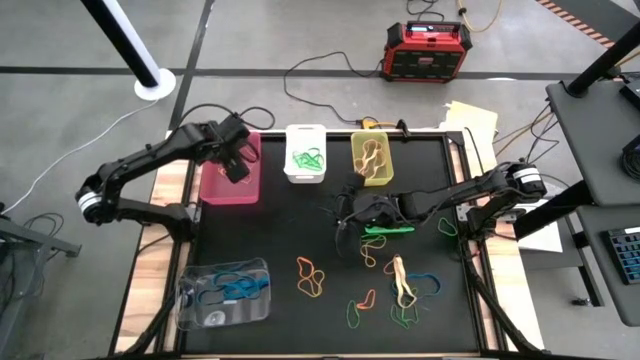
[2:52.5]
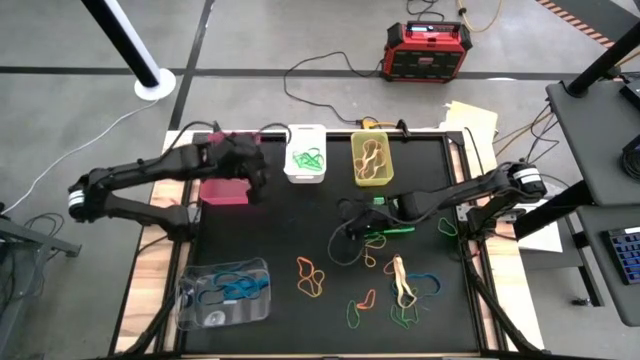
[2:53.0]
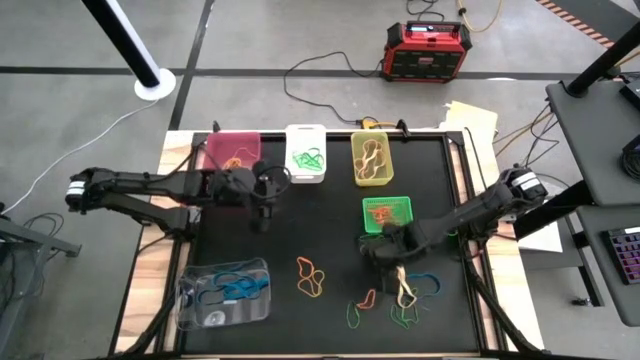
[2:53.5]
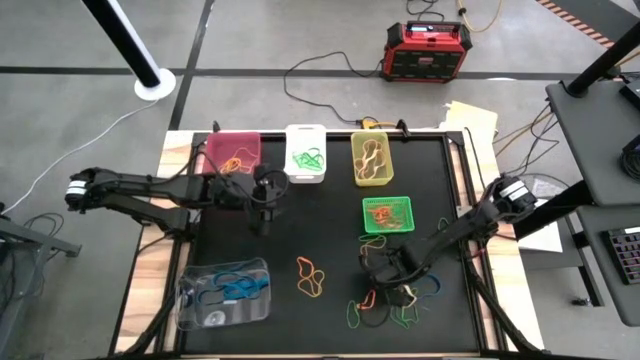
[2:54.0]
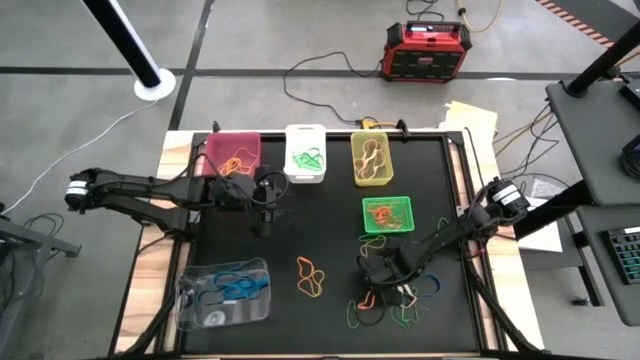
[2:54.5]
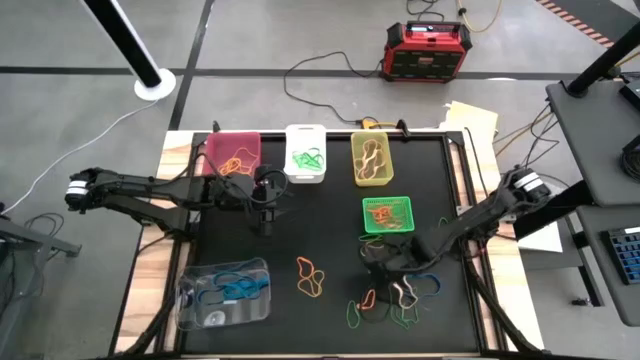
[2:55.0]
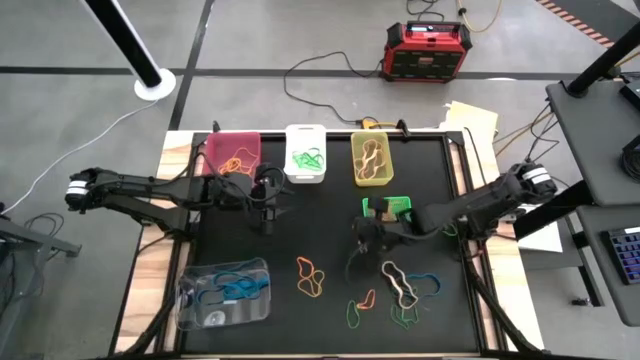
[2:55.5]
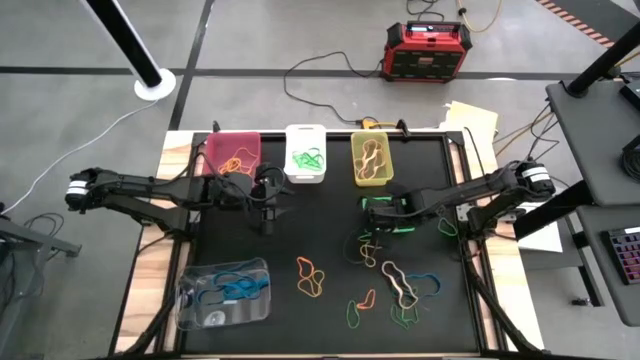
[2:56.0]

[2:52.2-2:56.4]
Task: Sort rubber bands into baskets
Put the orange rubber band into the green bin

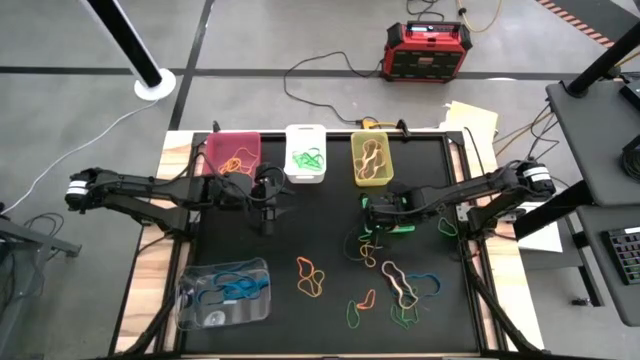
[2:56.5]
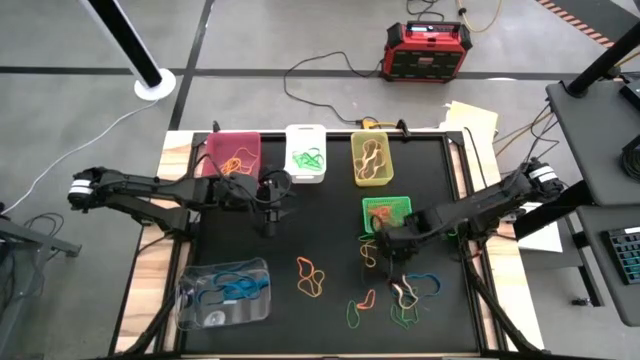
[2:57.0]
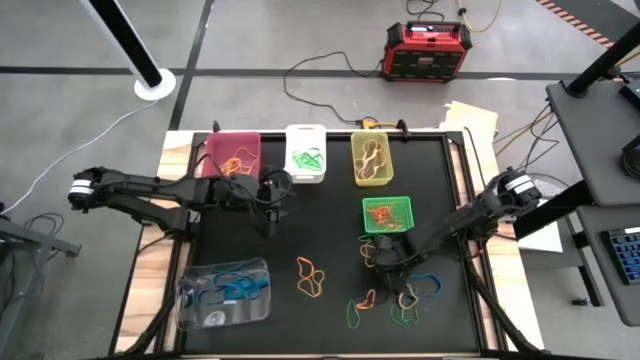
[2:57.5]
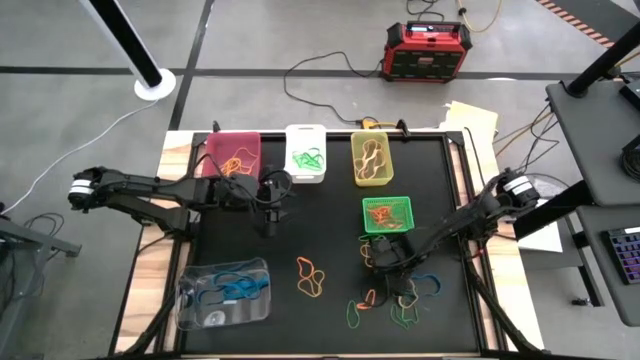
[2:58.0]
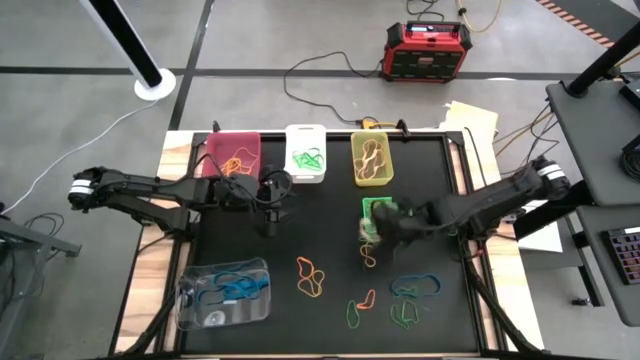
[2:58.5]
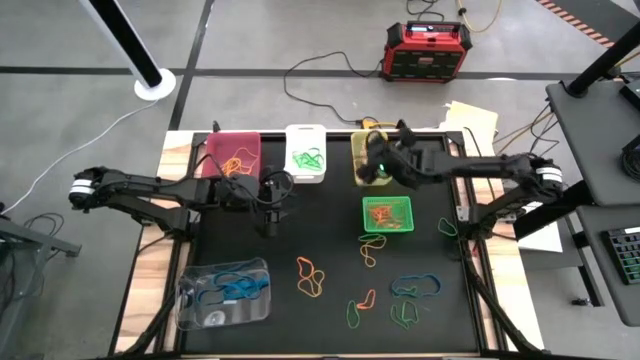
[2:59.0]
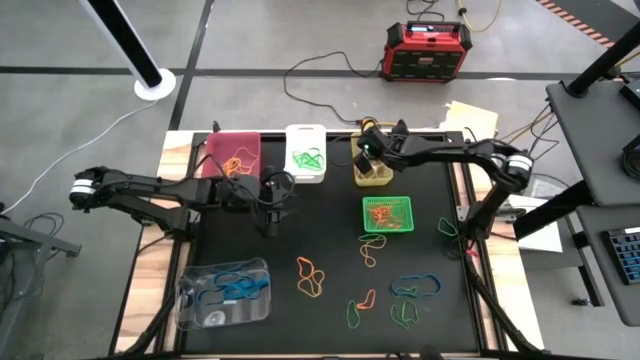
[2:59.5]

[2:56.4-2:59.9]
Put the brown rubber band into the yellow bin

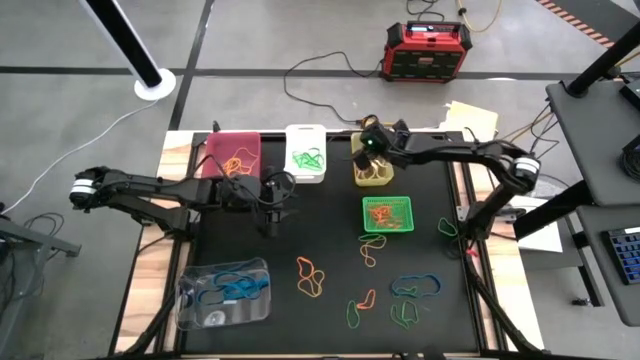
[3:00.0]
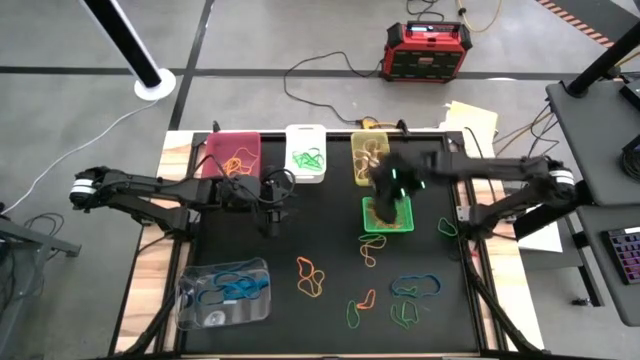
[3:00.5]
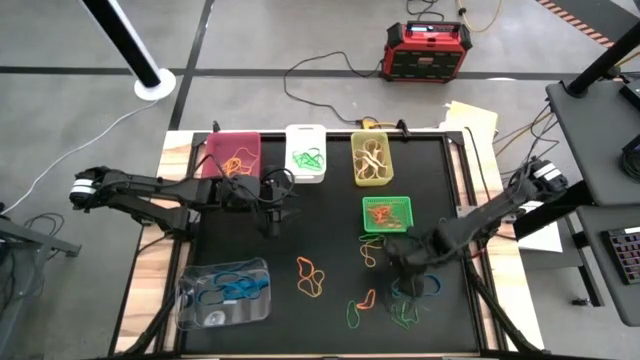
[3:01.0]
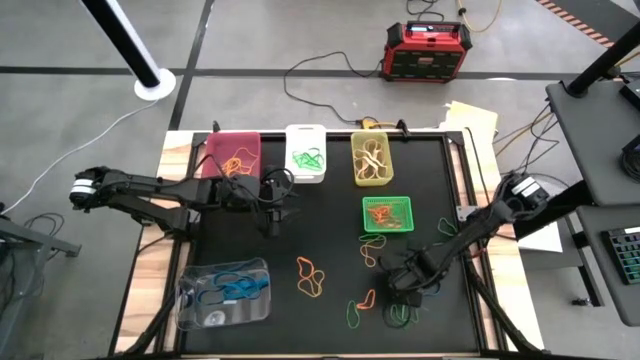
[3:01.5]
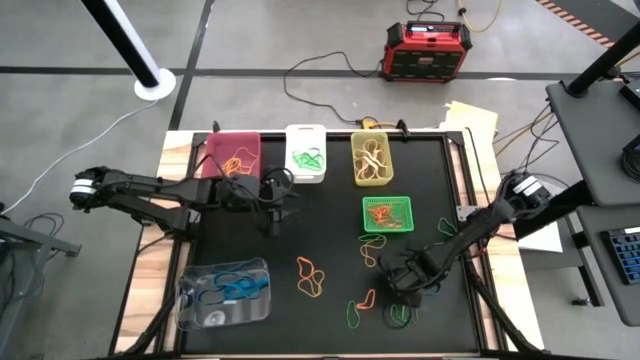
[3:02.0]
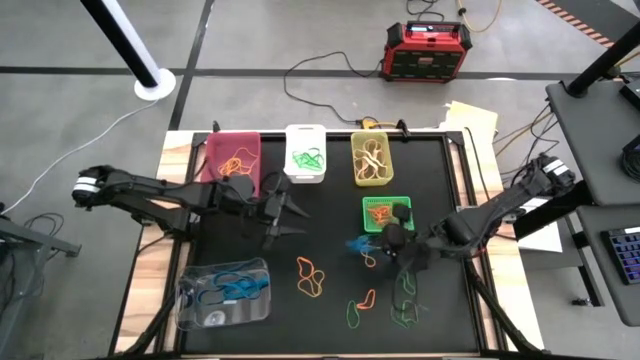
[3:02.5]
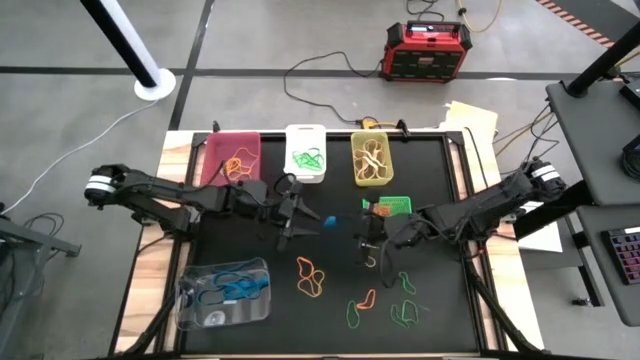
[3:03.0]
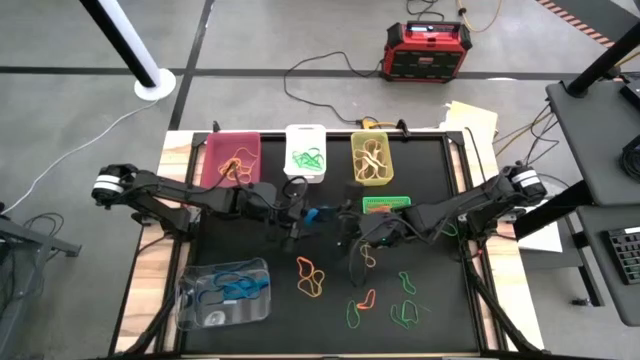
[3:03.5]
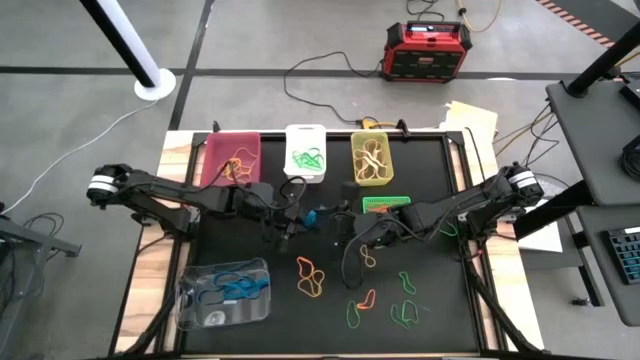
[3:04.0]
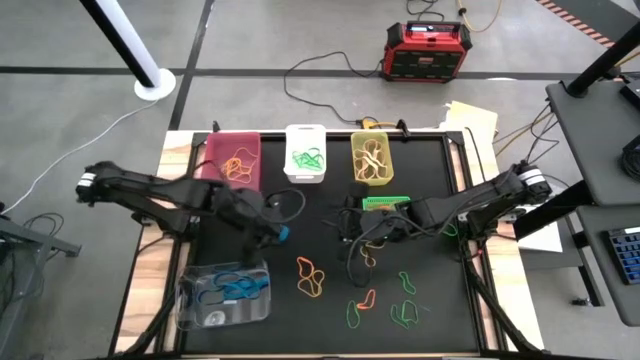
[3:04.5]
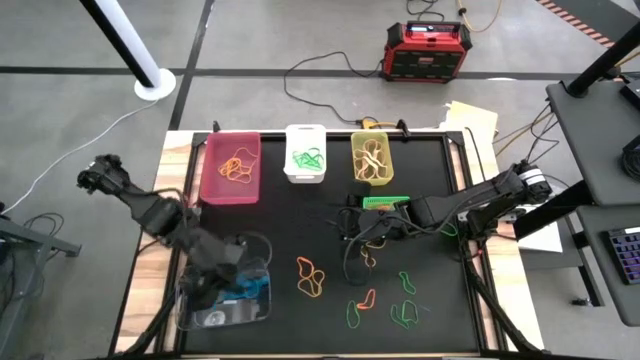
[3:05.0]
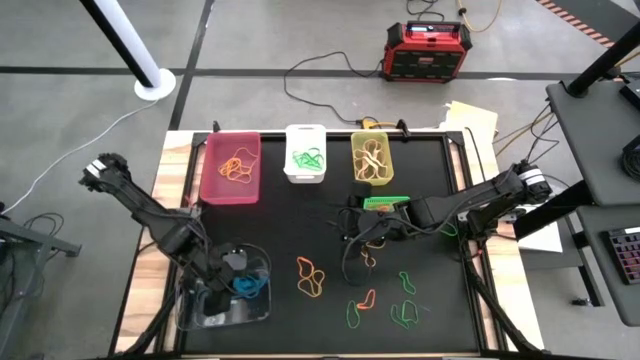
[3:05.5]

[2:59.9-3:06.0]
Put the blue rubber band into the transparent bin

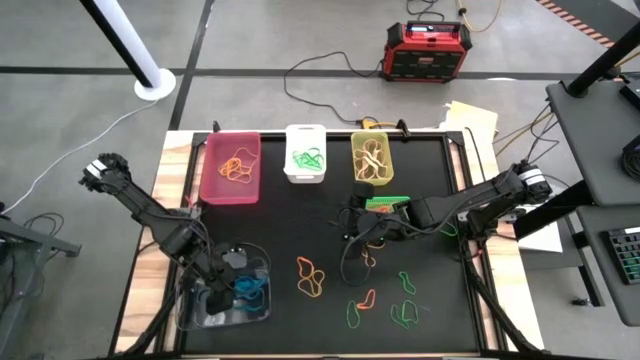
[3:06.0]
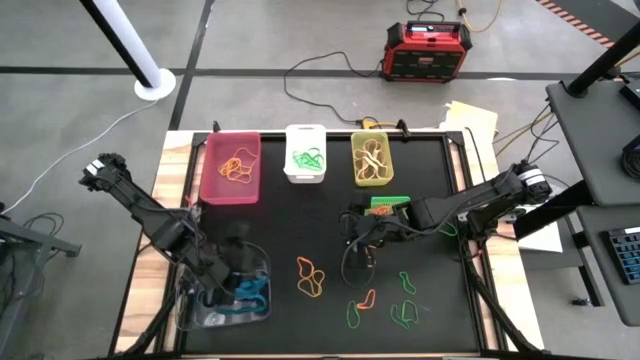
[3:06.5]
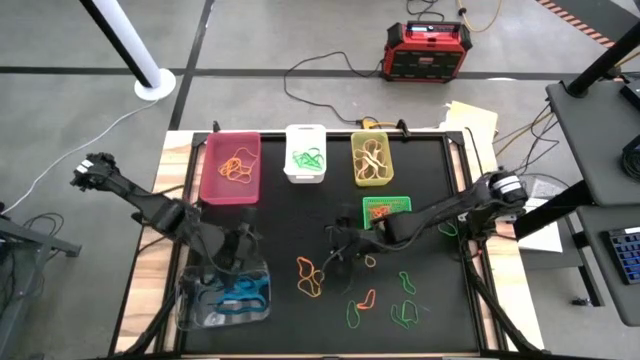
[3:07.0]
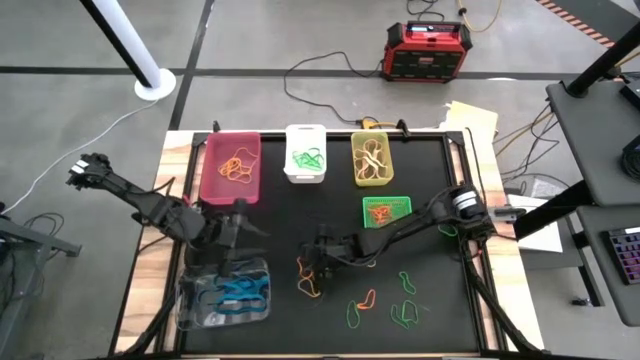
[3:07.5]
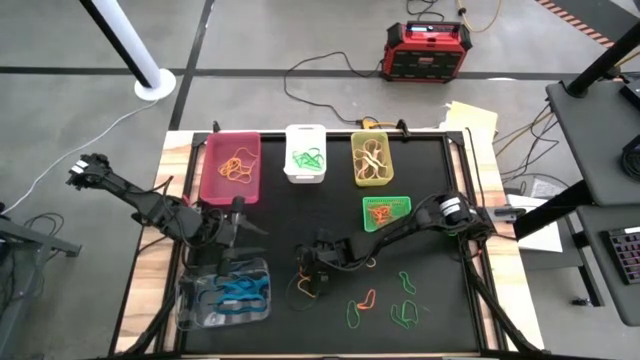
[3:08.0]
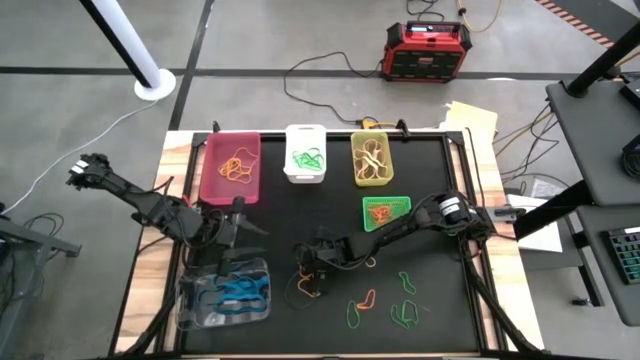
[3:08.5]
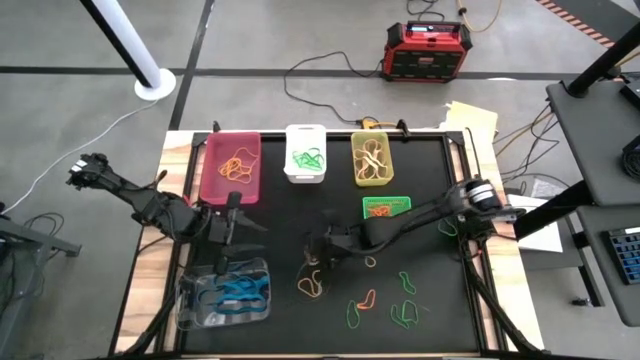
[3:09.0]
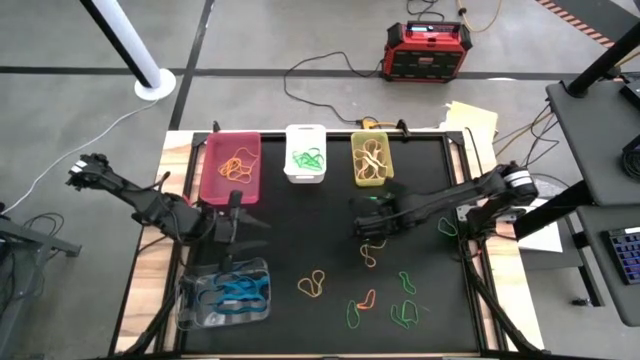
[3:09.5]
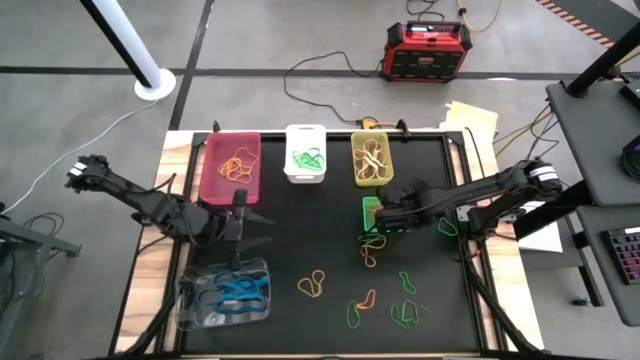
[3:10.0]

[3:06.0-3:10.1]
Put the orange rubber band into the green bin

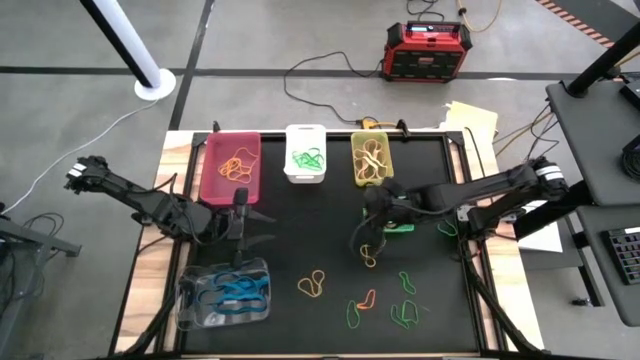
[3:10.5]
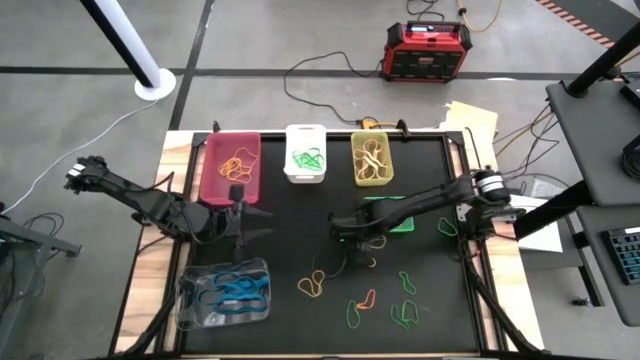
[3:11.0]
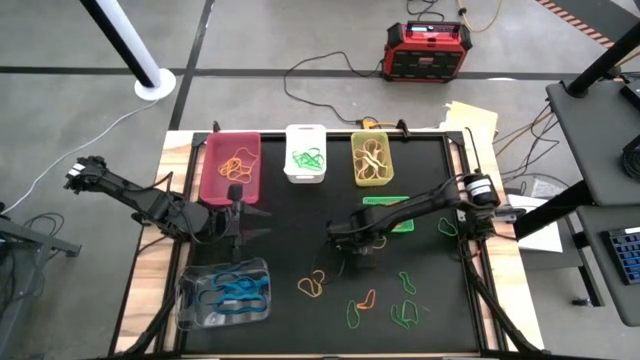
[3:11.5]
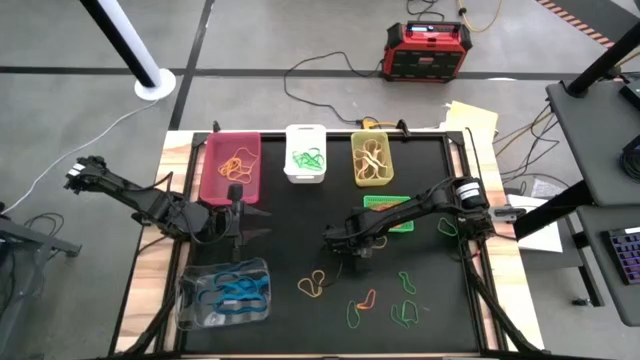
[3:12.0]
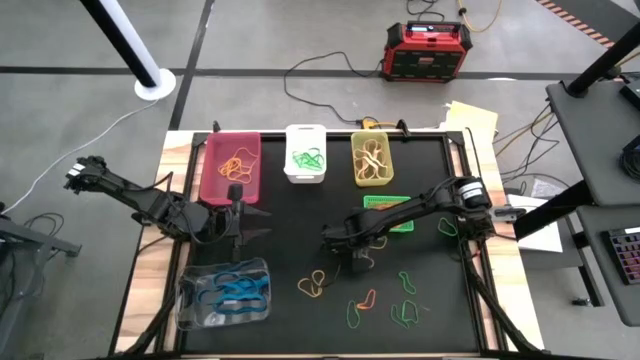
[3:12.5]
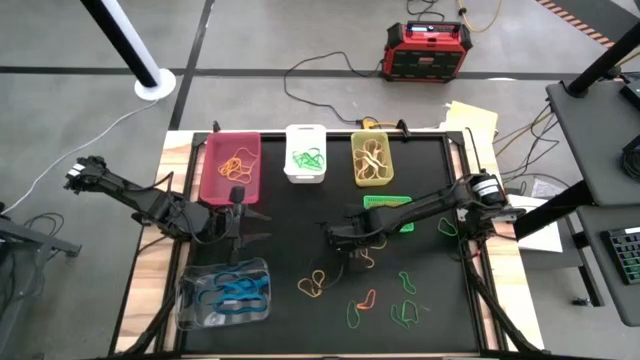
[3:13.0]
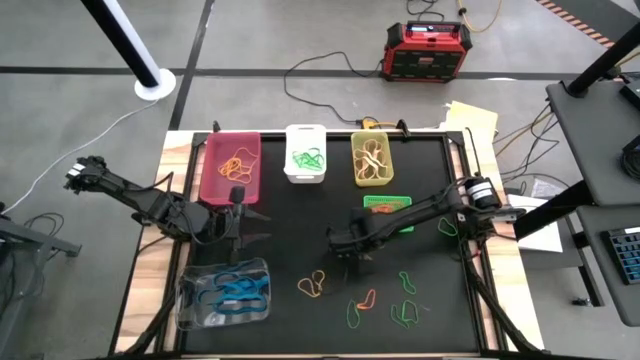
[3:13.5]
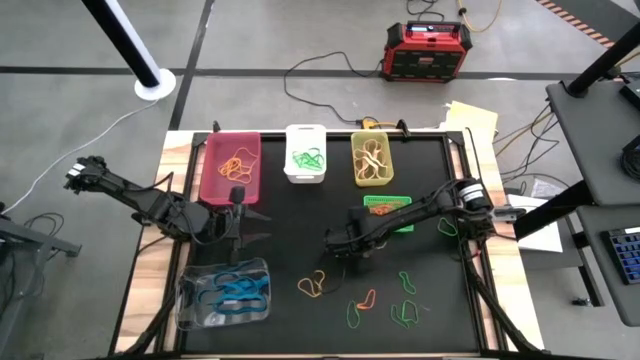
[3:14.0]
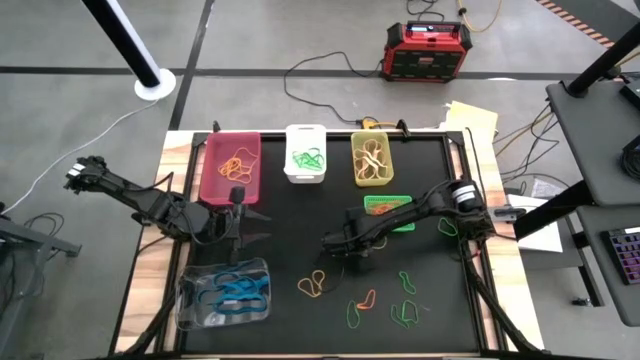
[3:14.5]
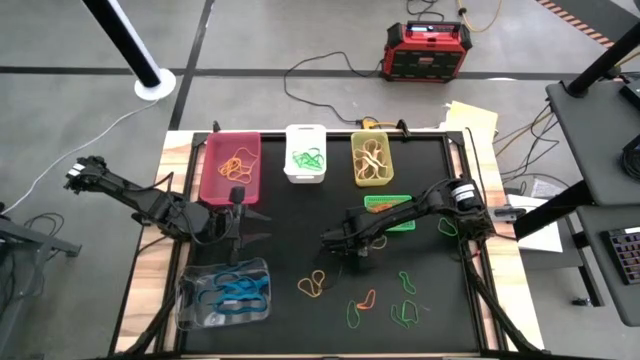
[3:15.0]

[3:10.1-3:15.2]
Put the green rubber band into the white bin
